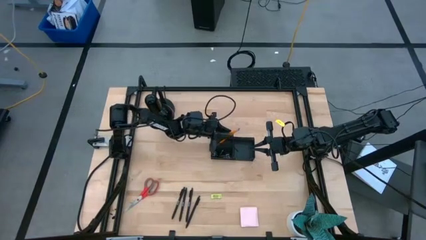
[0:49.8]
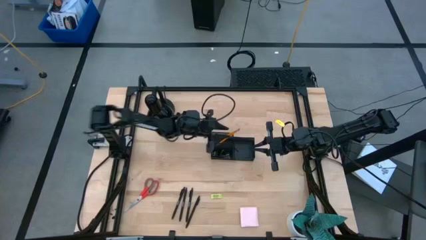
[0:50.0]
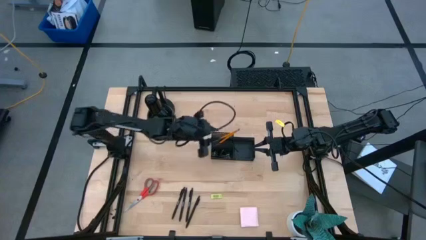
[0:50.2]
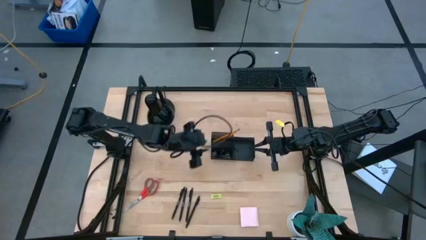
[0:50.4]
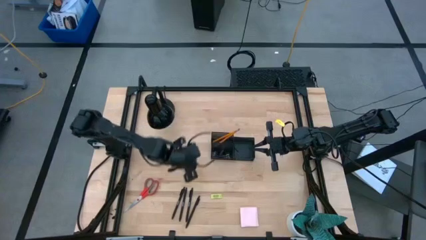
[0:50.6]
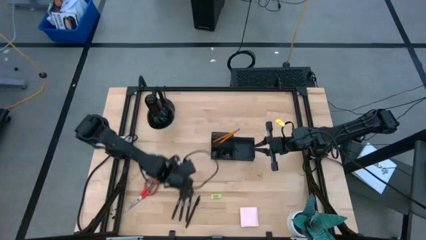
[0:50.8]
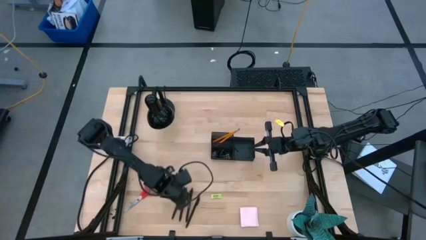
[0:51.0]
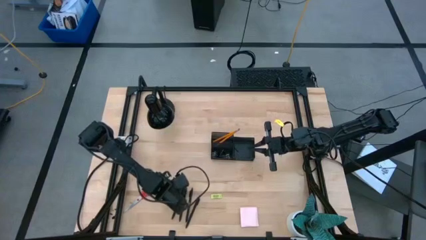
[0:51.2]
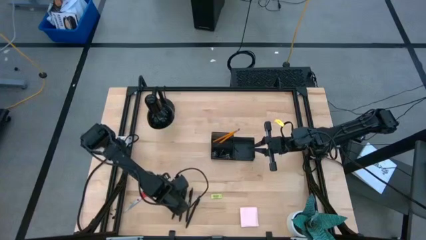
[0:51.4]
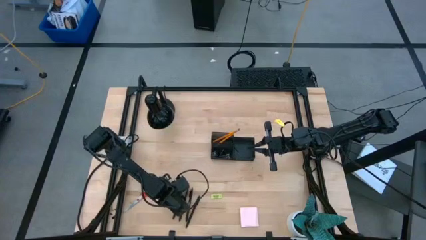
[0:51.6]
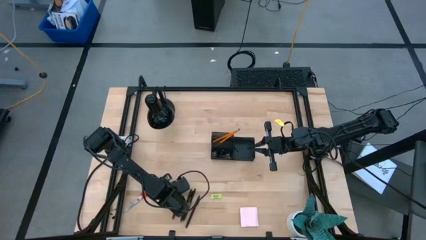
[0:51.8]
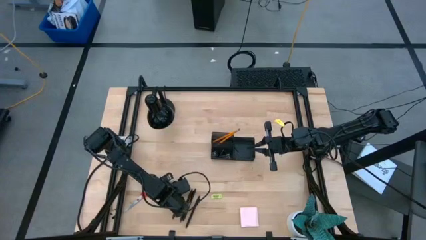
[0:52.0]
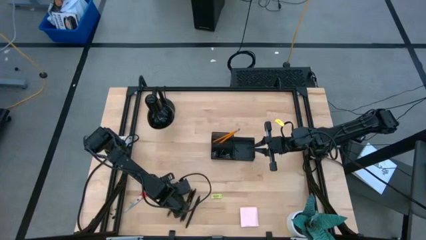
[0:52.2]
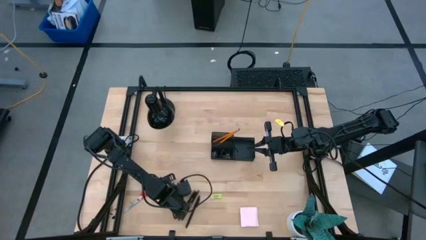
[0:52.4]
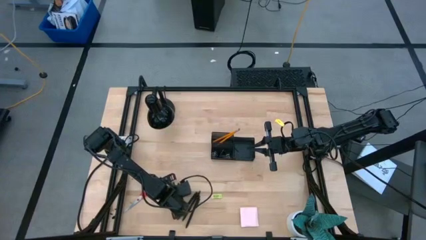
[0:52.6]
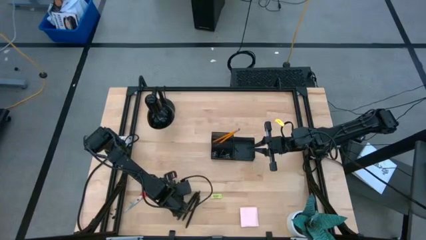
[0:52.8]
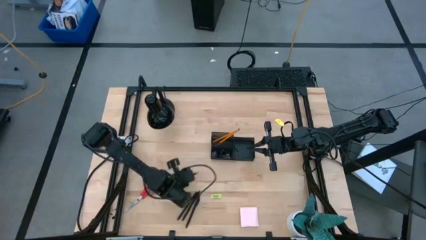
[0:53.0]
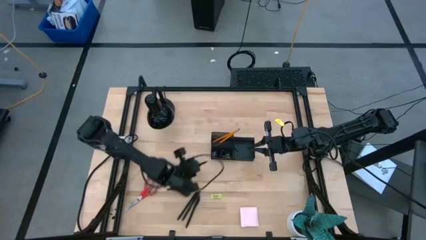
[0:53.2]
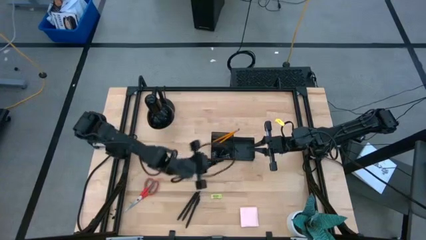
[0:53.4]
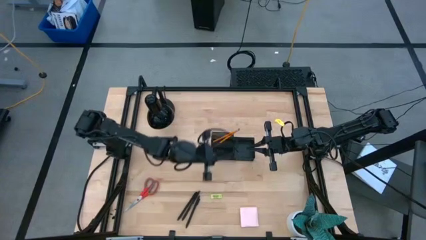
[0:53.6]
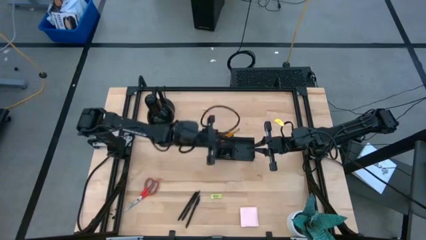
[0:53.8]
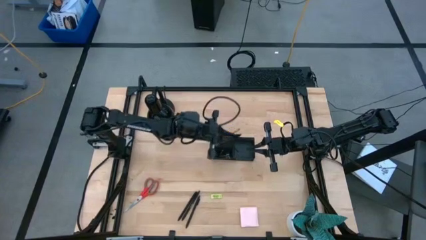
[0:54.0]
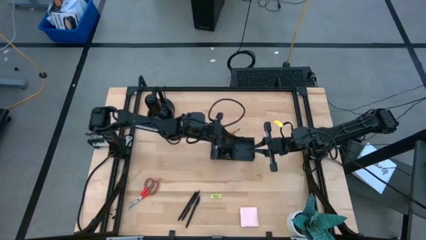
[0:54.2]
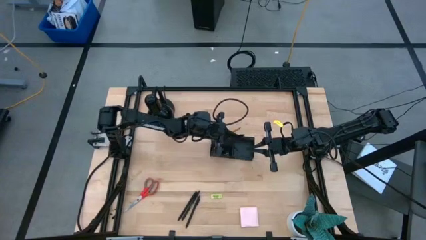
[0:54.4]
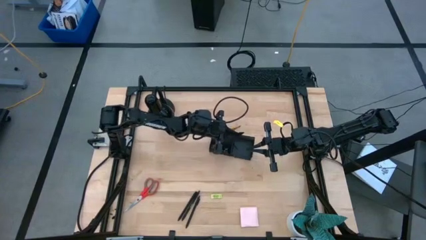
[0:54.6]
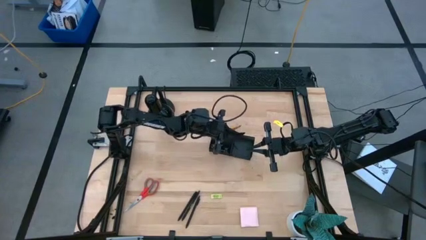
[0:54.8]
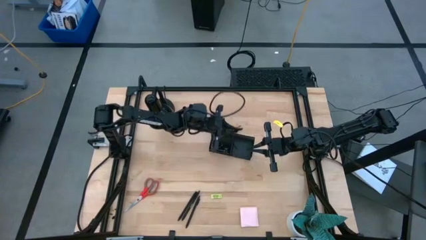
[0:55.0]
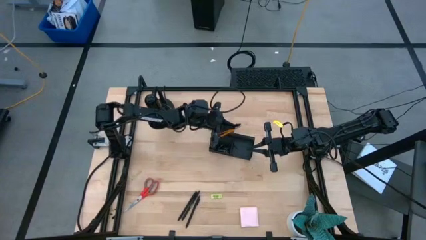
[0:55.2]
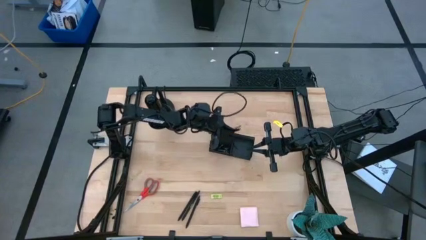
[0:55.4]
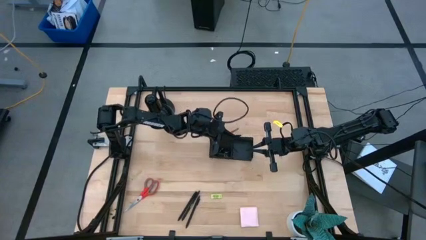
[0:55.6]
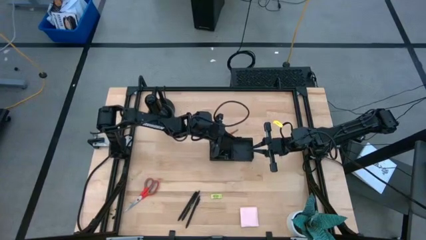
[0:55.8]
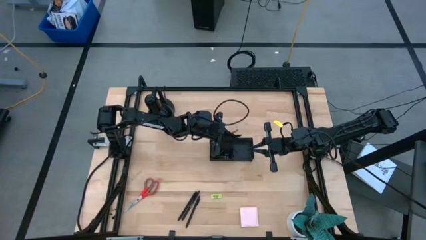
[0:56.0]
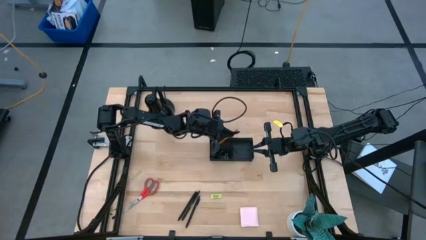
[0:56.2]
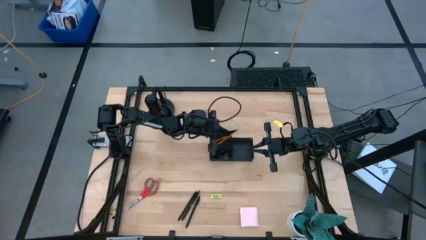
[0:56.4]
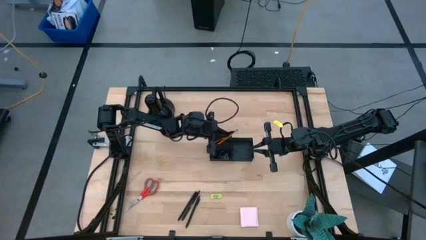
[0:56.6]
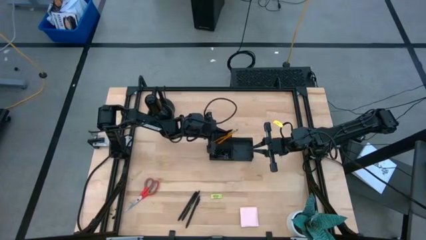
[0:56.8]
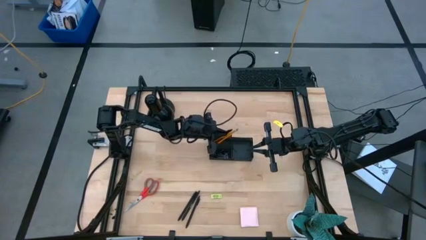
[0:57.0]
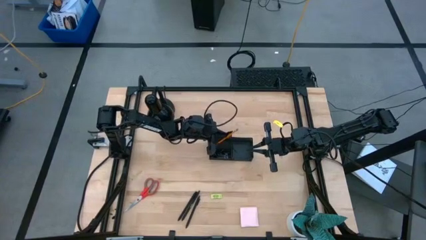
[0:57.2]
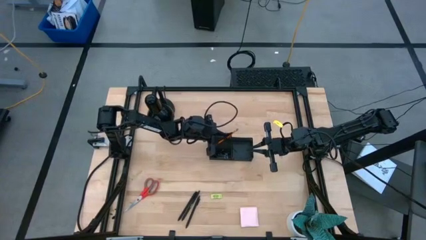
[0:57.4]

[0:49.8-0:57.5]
Task: Pick and place office supplies into organizer
Put the black pen into the black desk organizer

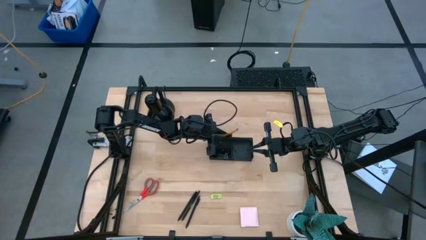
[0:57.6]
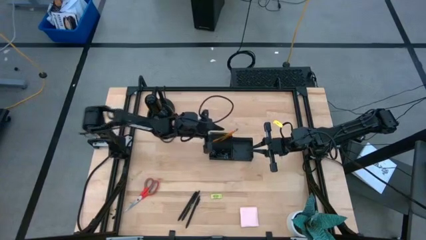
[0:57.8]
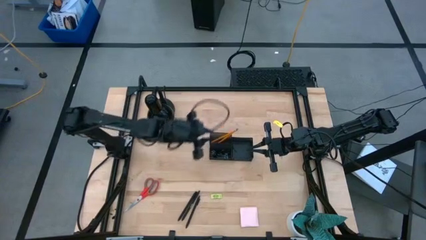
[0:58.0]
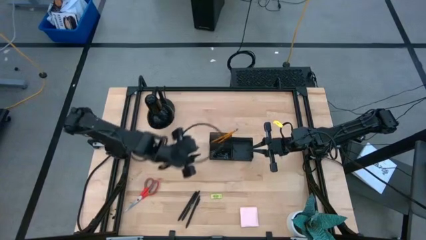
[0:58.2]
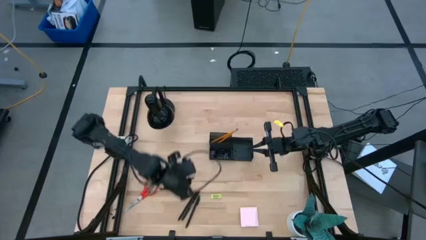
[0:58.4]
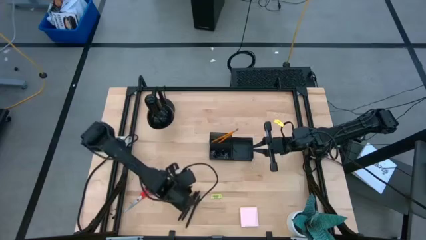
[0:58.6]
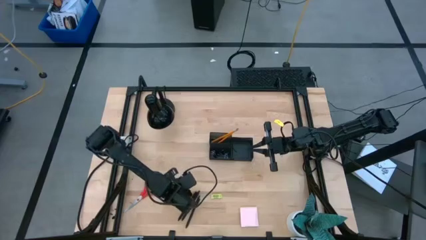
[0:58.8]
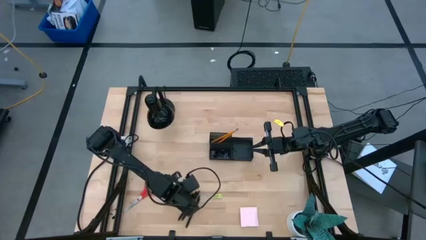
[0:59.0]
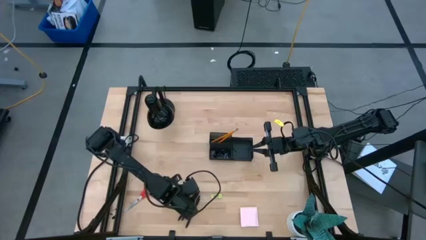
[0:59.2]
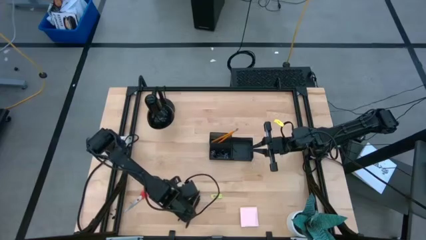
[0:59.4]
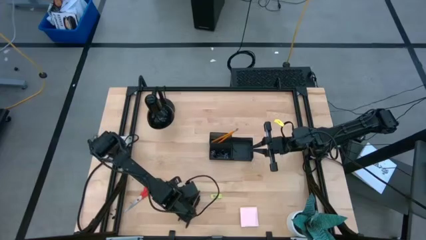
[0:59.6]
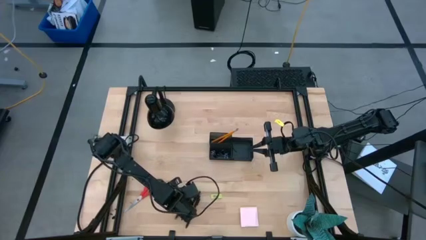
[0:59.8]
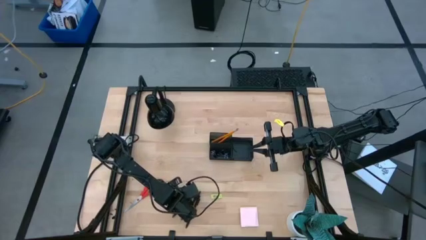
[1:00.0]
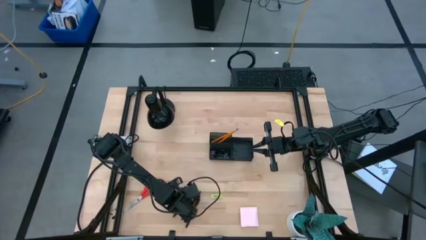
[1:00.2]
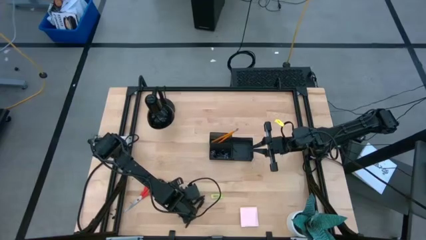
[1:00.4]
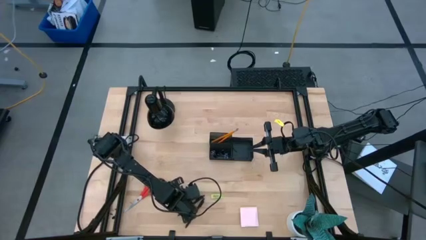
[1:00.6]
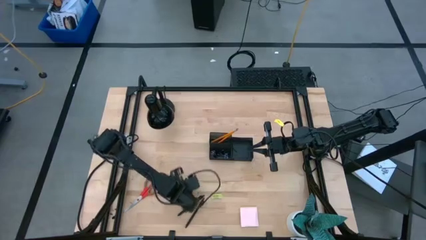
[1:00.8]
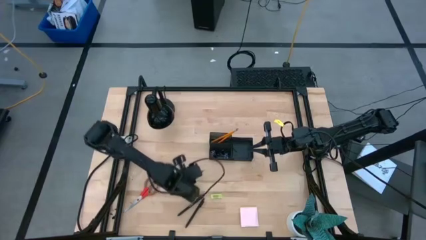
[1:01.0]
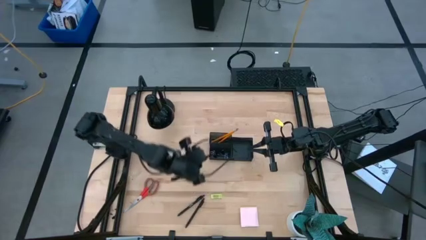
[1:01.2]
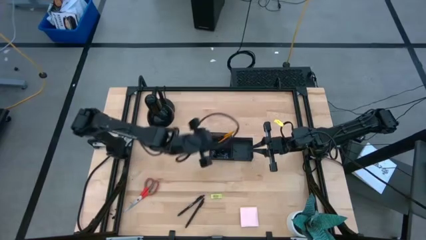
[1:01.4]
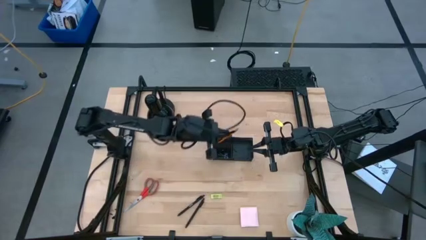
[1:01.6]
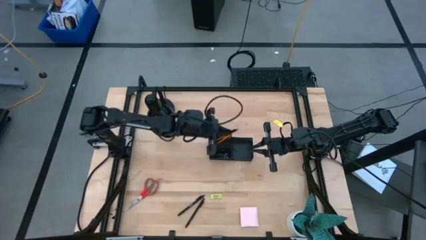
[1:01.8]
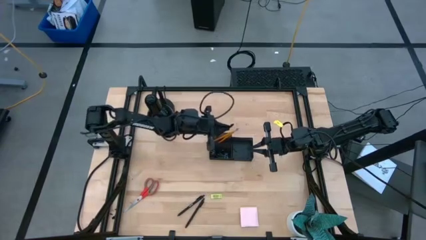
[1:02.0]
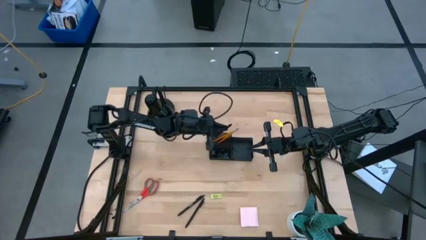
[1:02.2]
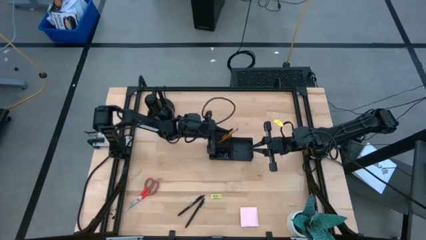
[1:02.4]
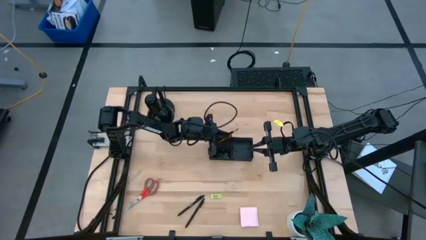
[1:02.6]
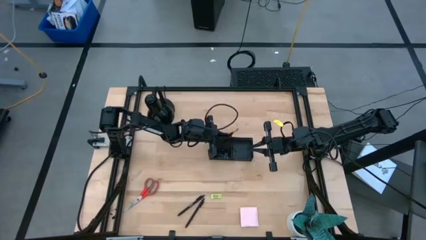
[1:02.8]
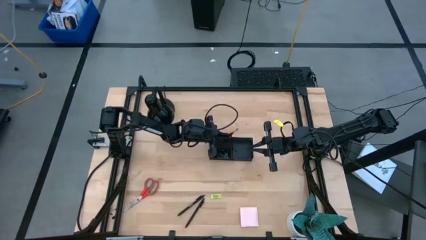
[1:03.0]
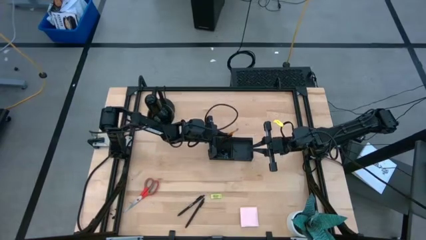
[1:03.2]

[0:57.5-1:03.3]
Put the black pen into the black desk organizer

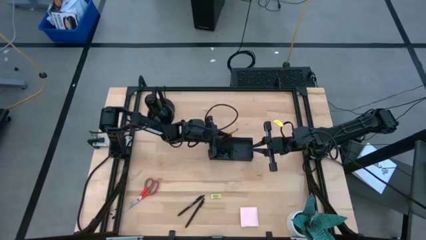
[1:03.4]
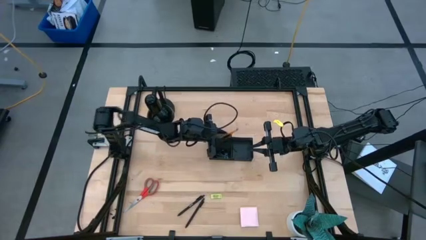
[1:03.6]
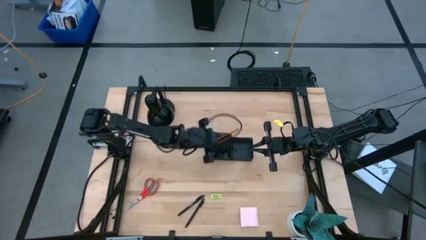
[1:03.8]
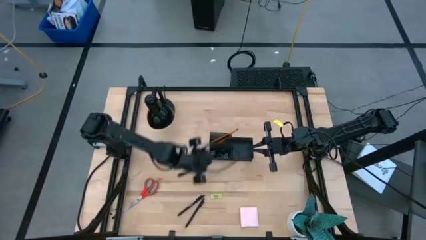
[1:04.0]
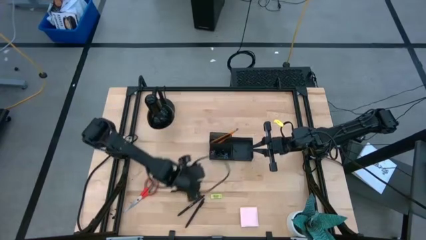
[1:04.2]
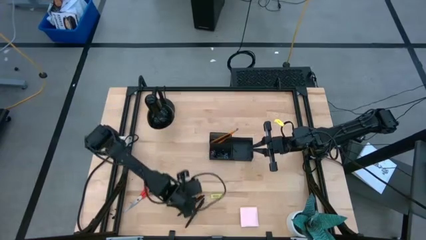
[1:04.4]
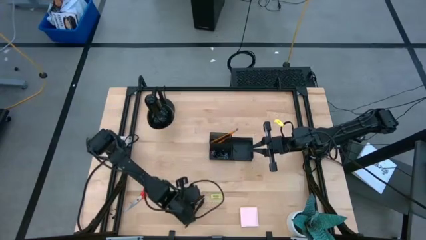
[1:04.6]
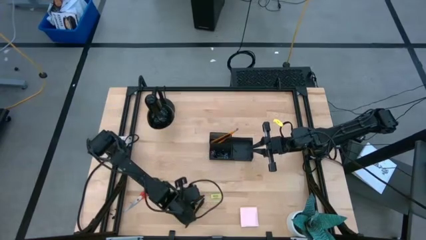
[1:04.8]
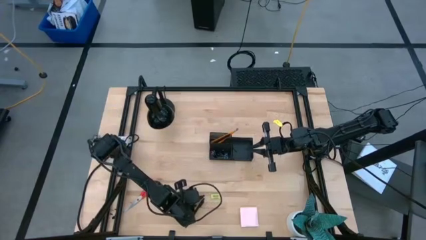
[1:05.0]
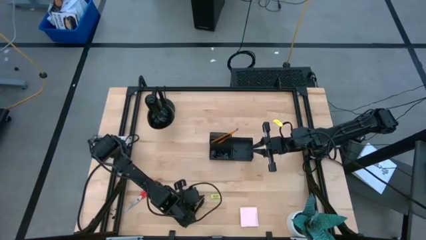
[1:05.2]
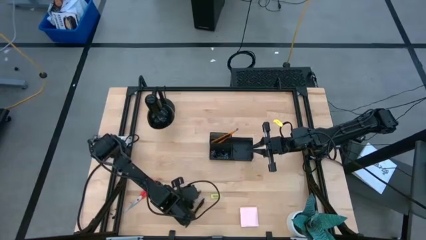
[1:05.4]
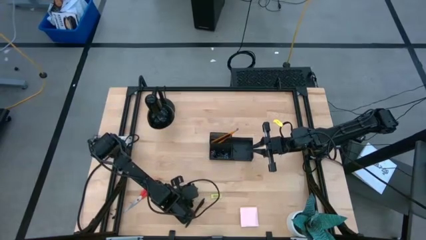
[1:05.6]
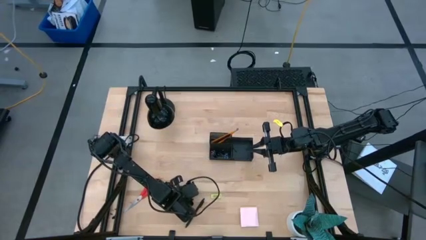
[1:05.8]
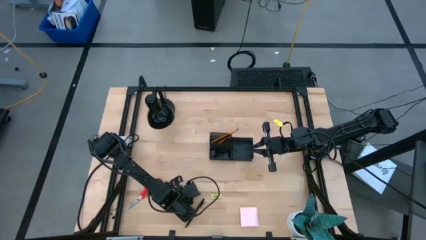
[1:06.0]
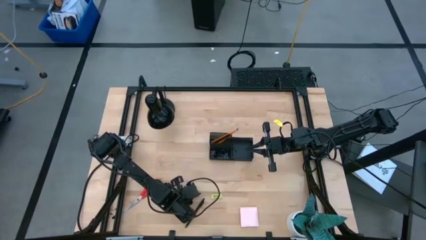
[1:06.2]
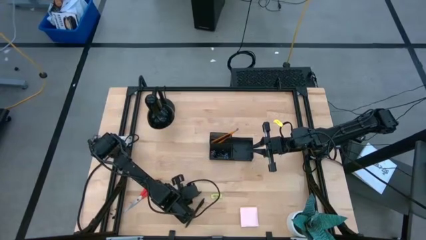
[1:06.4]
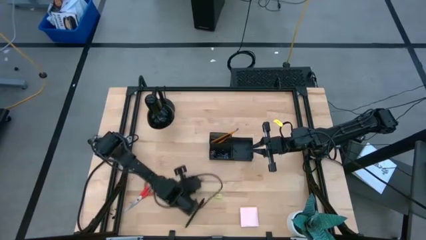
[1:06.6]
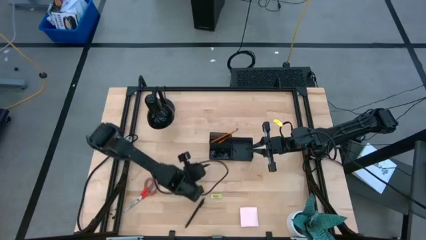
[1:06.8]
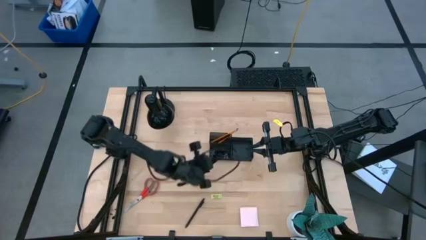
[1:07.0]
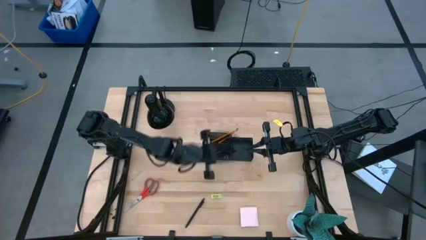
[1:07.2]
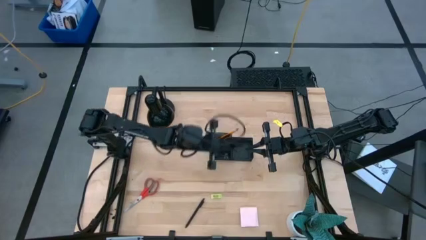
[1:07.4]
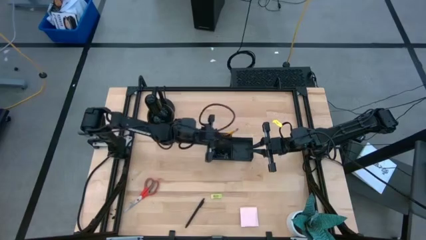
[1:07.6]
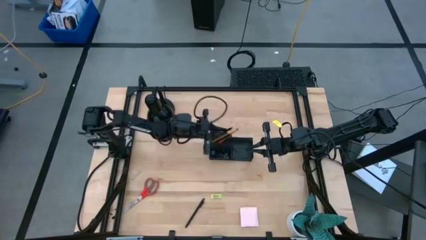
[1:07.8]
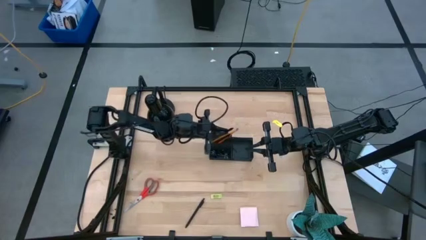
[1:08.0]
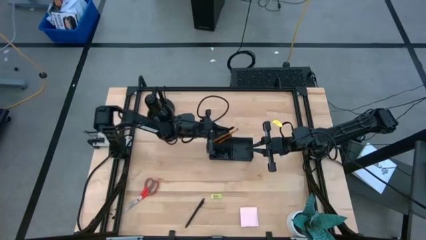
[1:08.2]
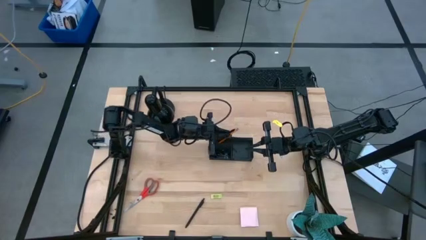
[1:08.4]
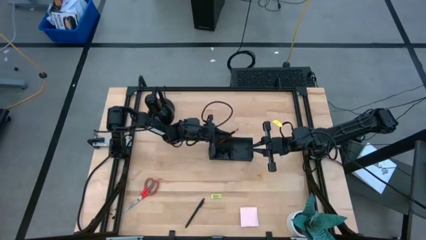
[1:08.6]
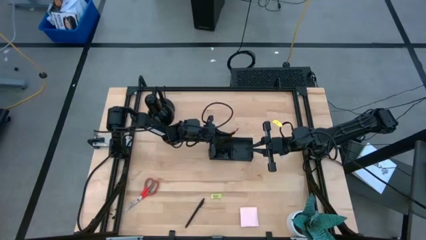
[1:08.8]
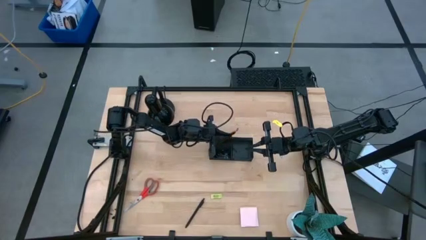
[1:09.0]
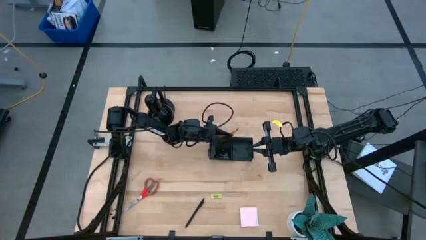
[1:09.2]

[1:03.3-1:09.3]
Put the black pen into the black desk organizer
